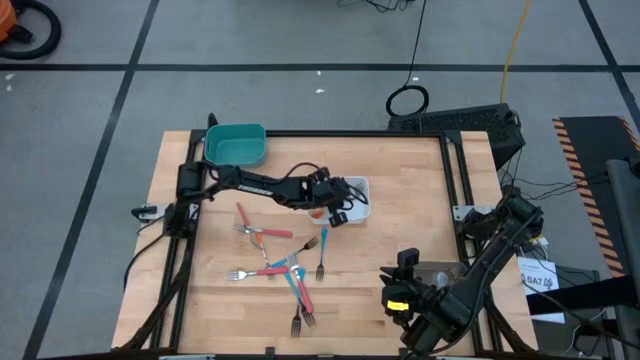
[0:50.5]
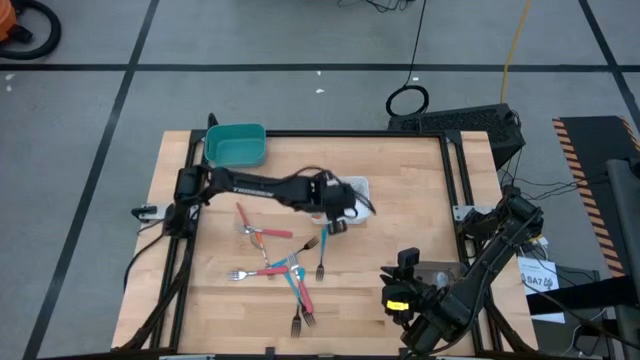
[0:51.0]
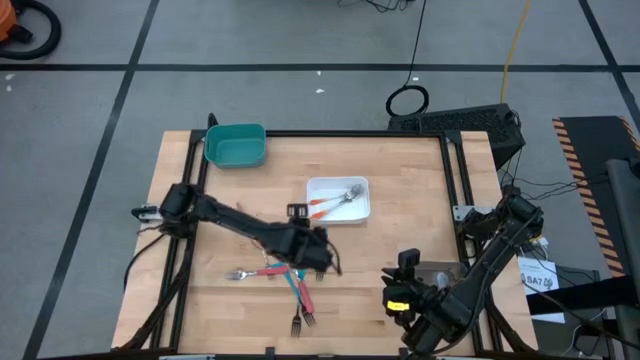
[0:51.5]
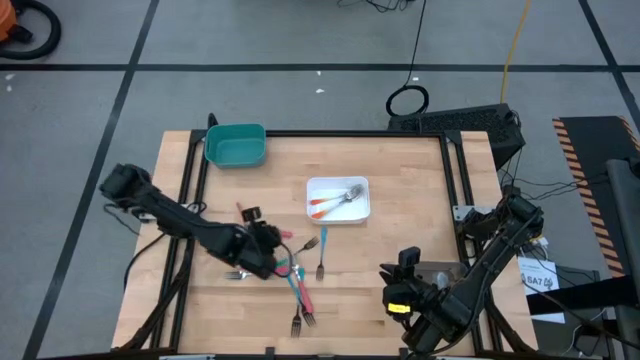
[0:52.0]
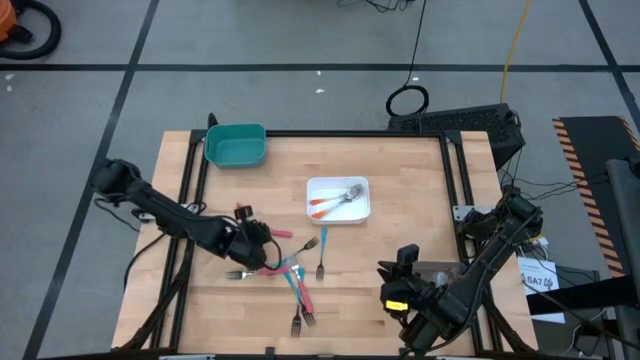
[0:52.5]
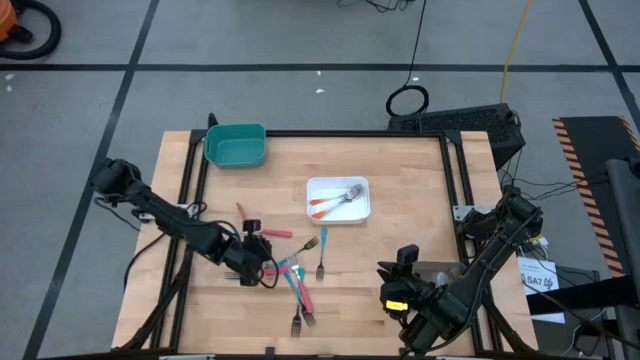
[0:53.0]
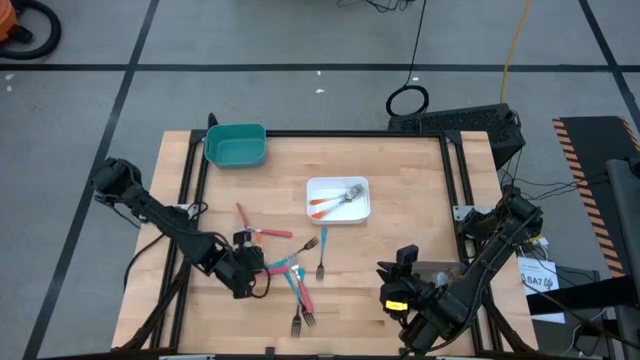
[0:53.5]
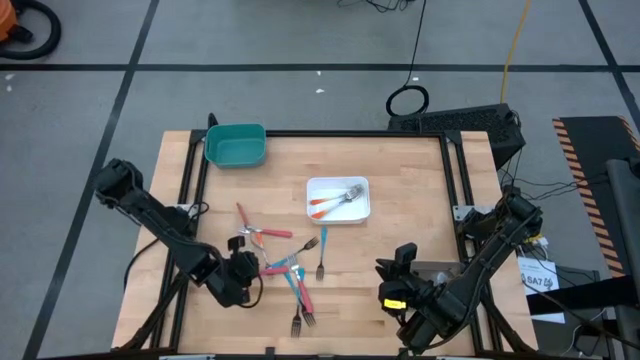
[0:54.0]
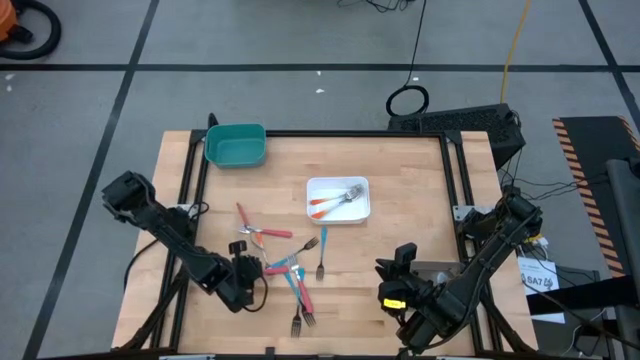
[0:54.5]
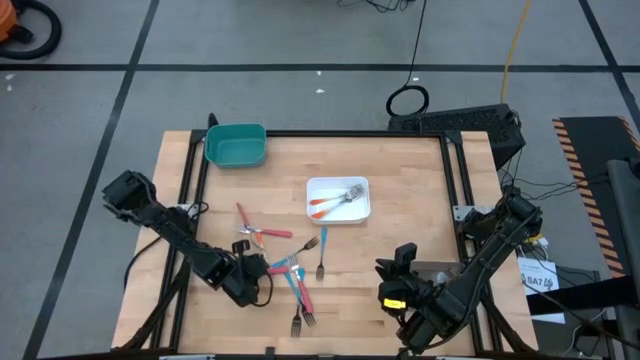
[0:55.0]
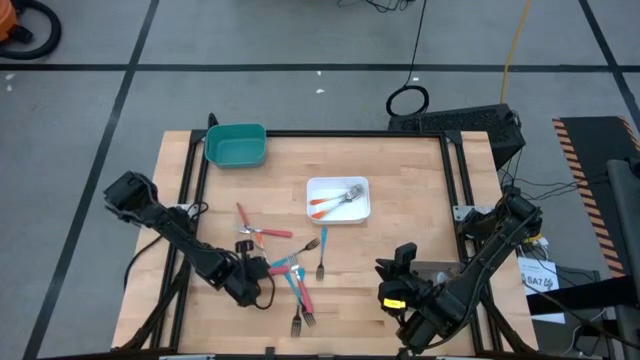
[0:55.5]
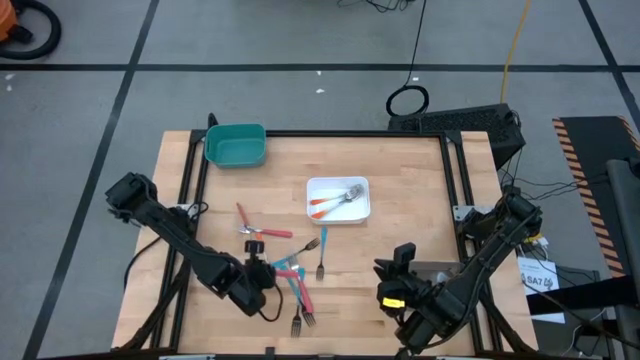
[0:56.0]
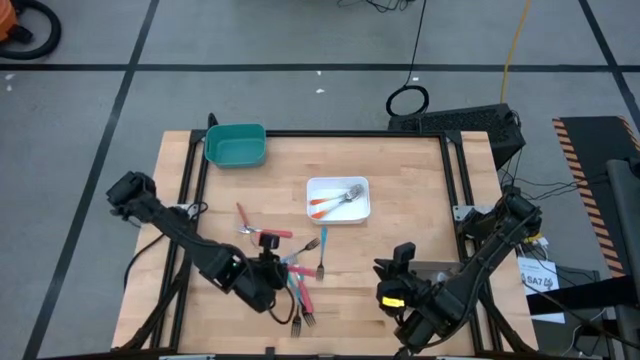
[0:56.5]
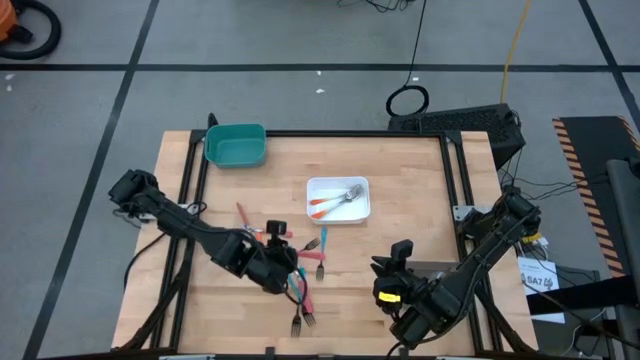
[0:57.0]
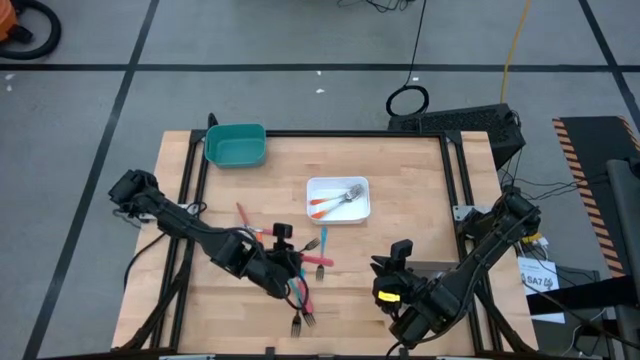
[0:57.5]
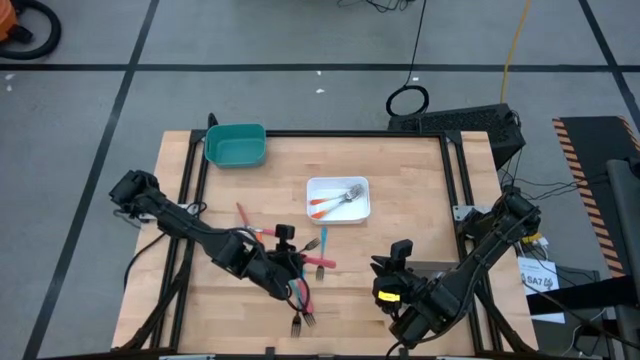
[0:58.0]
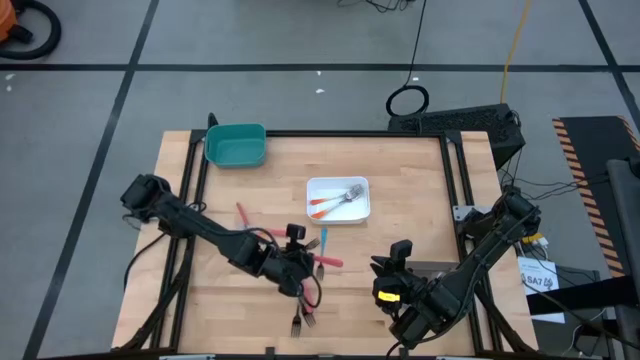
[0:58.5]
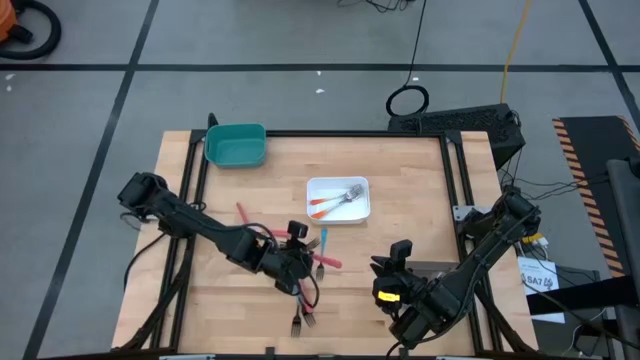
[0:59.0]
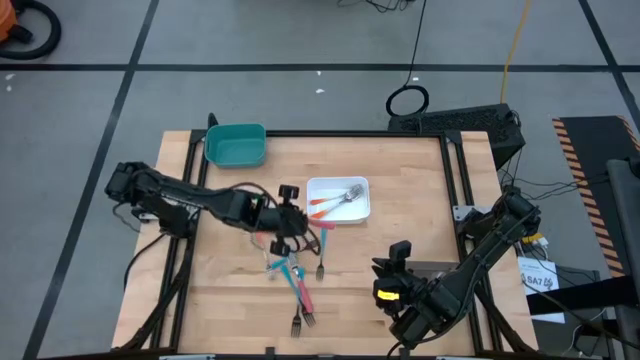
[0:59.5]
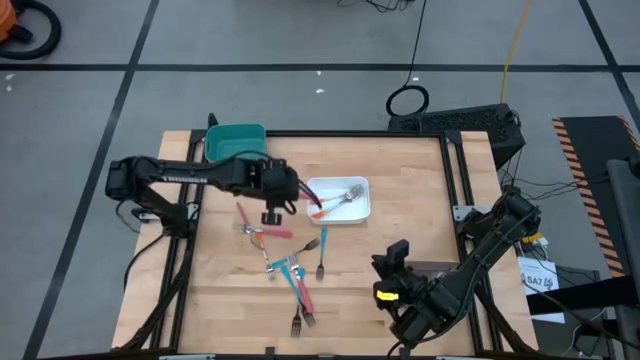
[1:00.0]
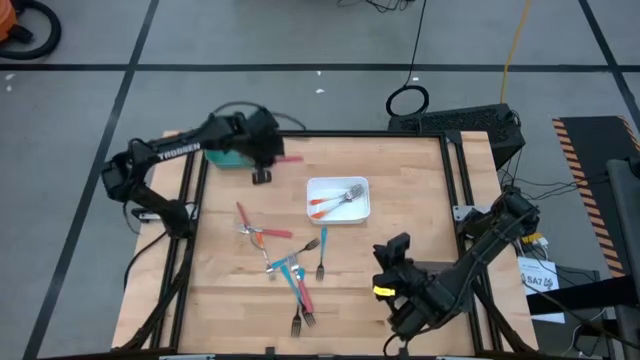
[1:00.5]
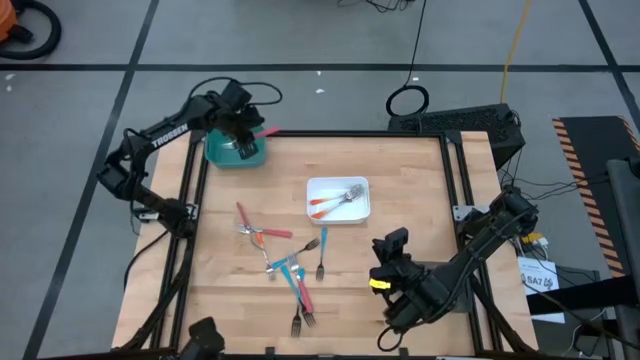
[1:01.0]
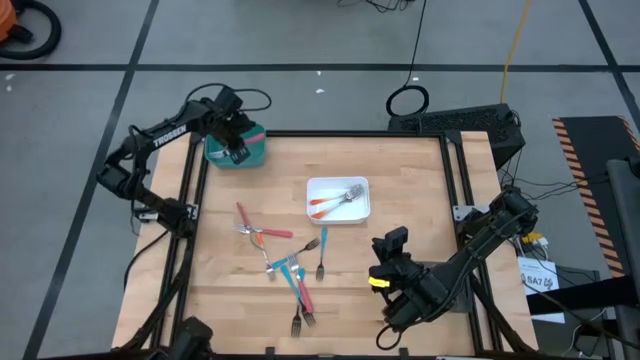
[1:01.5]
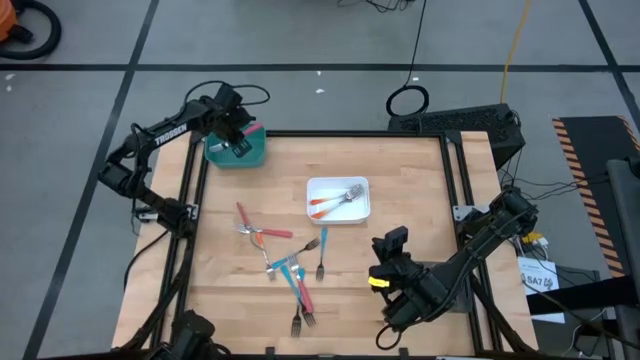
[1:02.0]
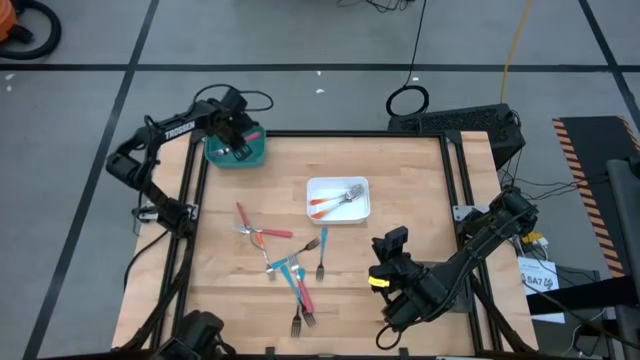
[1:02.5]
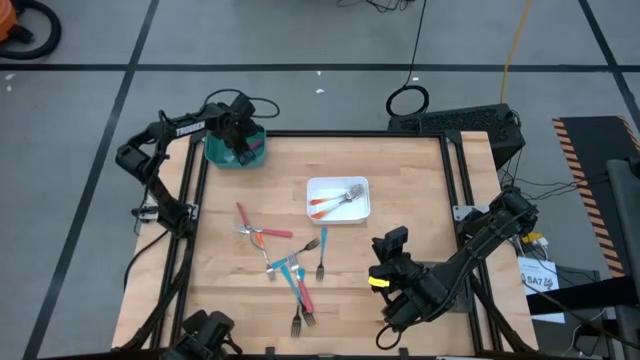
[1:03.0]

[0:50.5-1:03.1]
Task: Sort silverware by color (type)
Put the pink fork into the blue bin

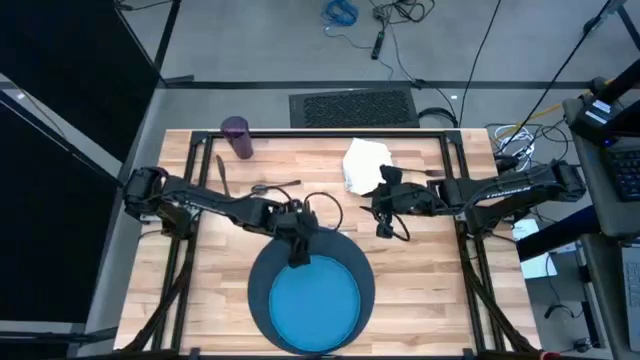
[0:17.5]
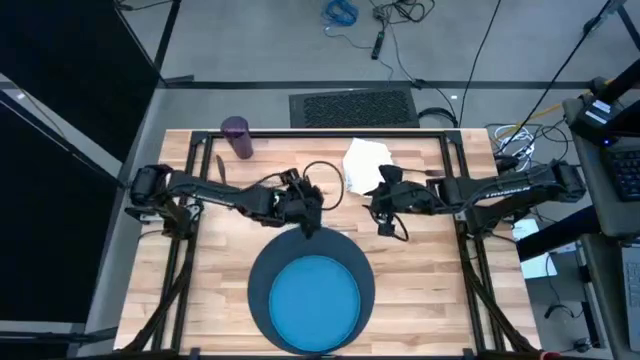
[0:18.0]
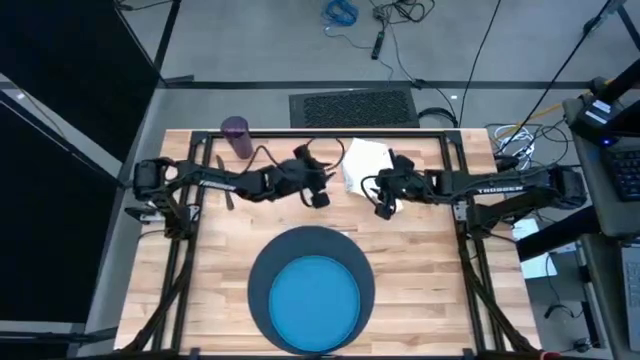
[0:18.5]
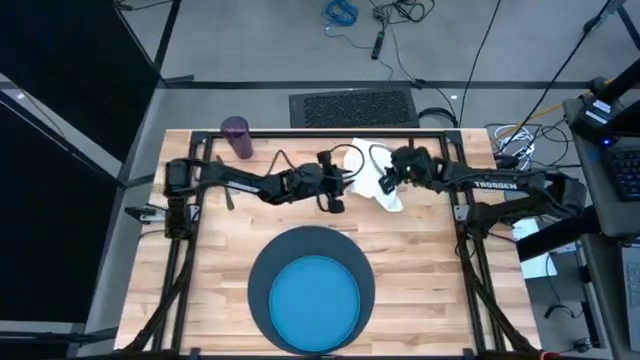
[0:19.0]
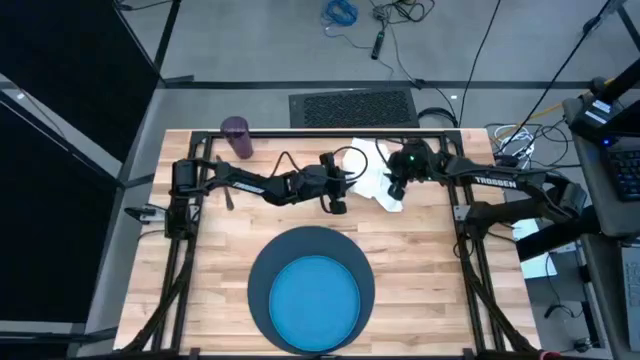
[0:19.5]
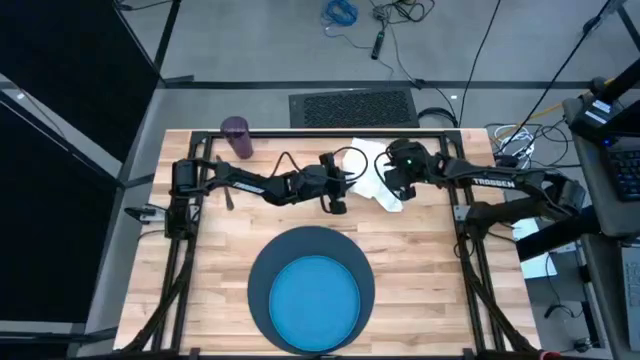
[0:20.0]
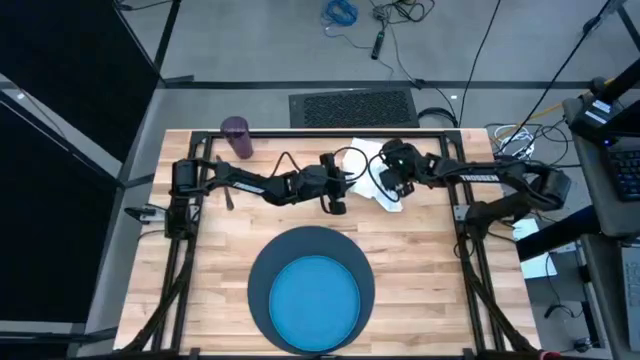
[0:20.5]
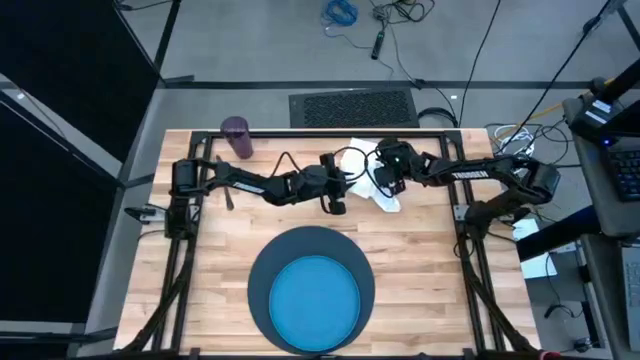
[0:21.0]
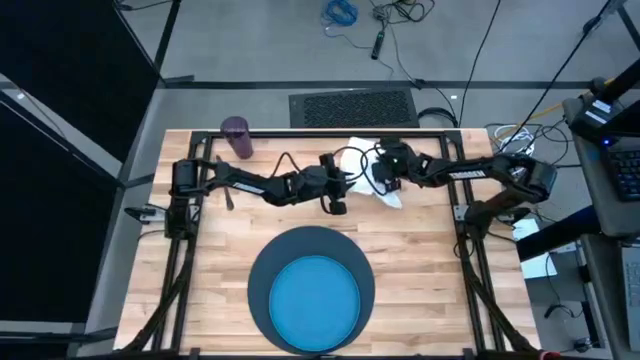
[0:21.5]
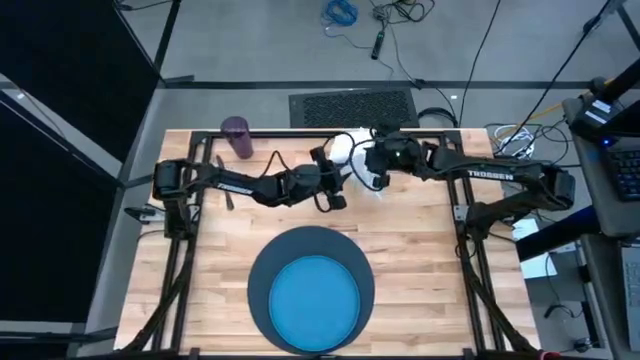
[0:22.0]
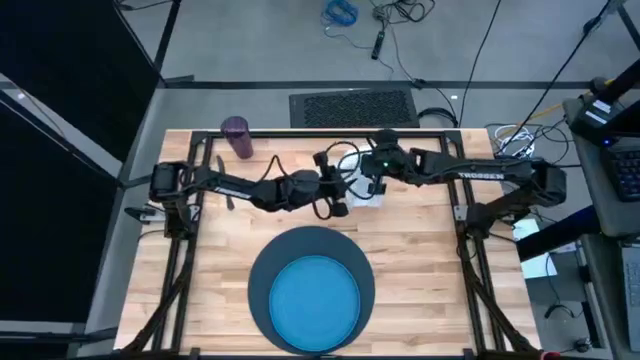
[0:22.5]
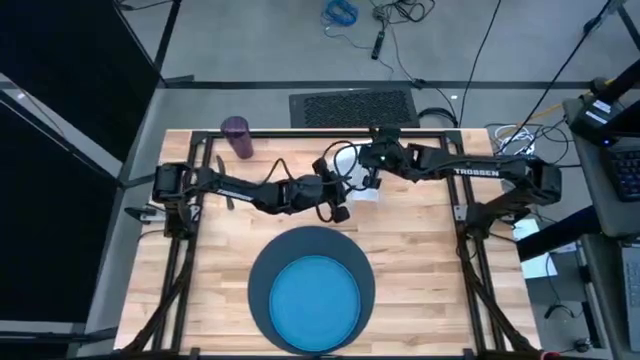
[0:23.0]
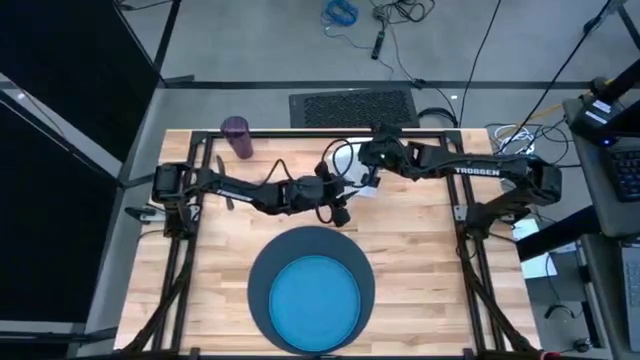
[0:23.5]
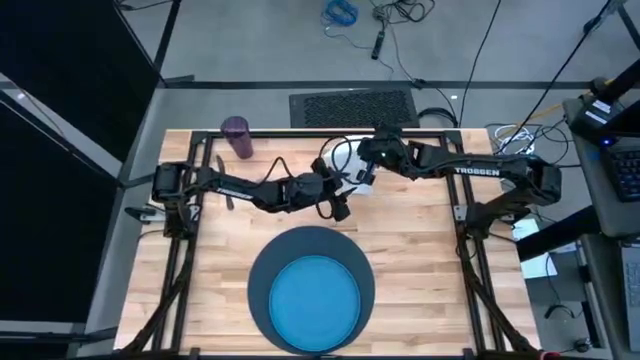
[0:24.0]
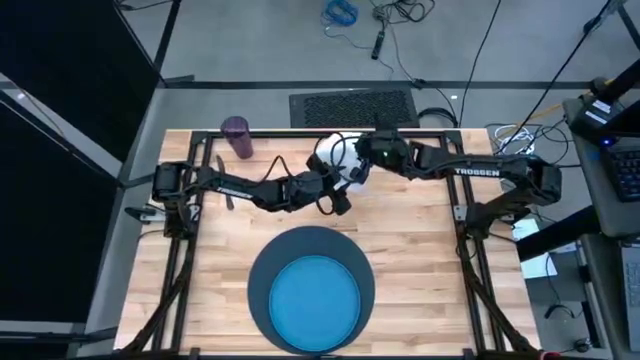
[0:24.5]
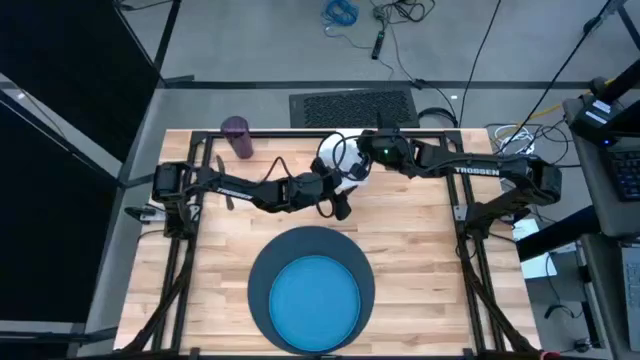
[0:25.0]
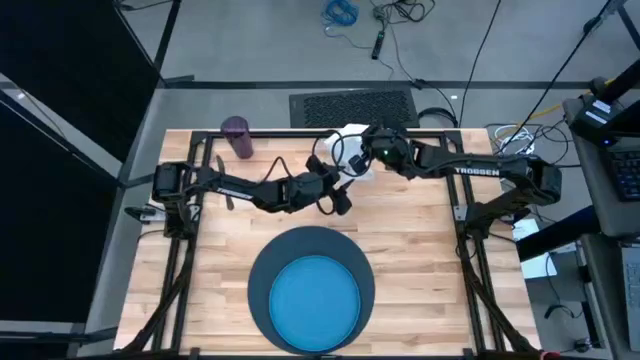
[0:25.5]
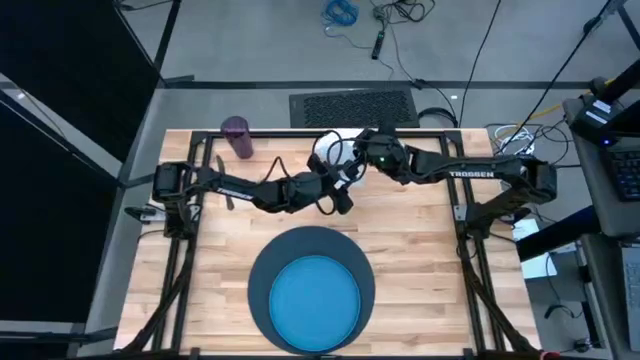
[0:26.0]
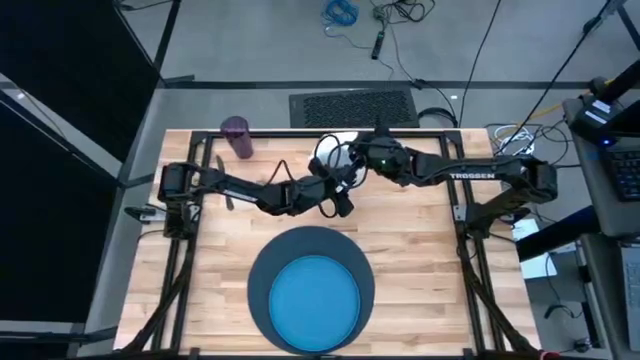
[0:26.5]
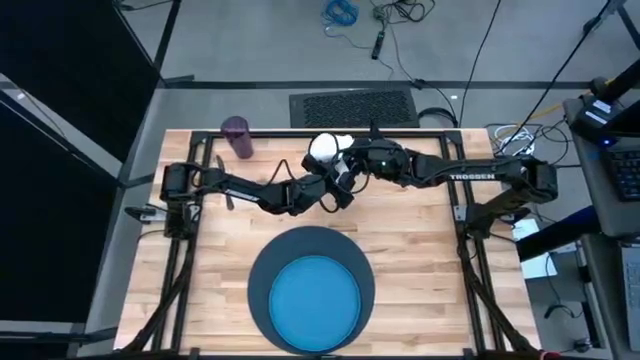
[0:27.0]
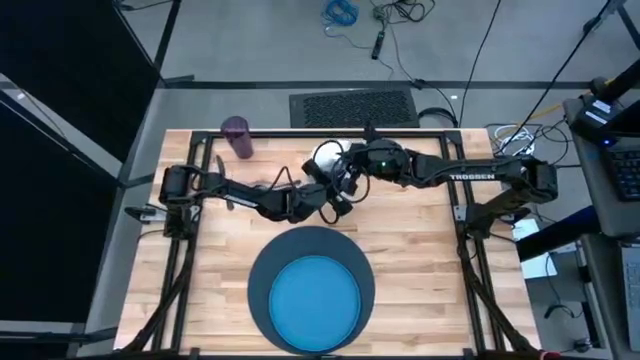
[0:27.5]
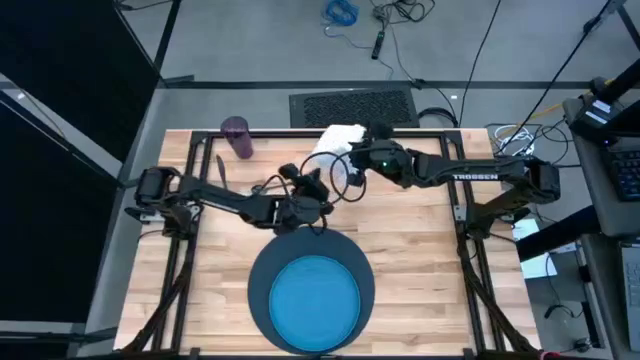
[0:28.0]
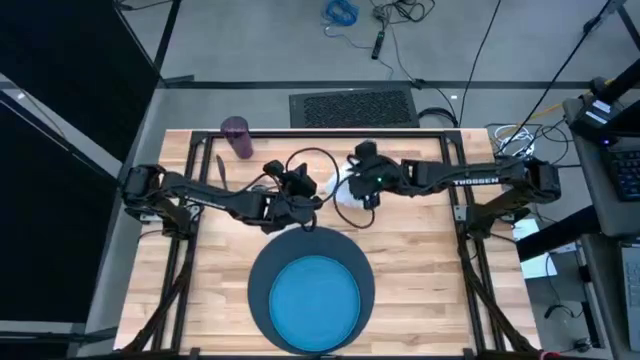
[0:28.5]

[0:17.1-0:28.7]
Task: Set table place
Fold the white napkin
